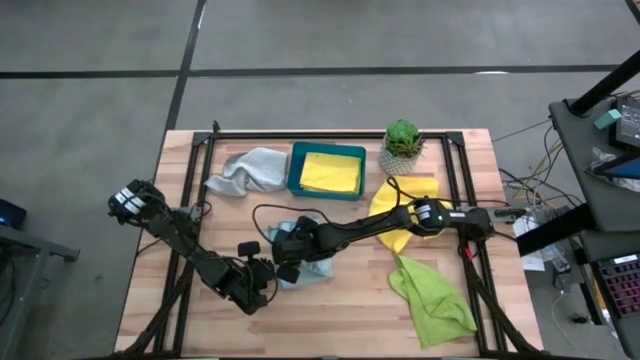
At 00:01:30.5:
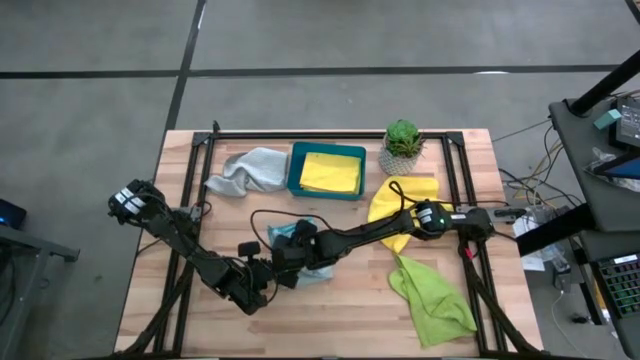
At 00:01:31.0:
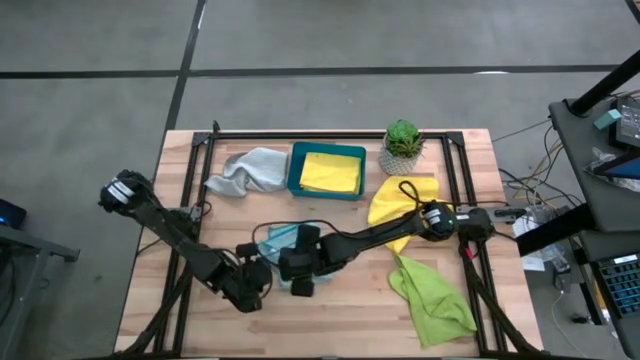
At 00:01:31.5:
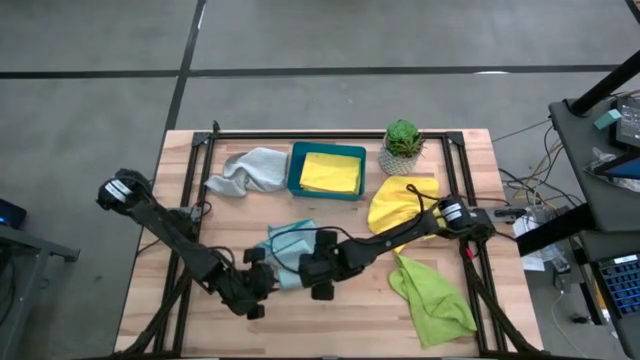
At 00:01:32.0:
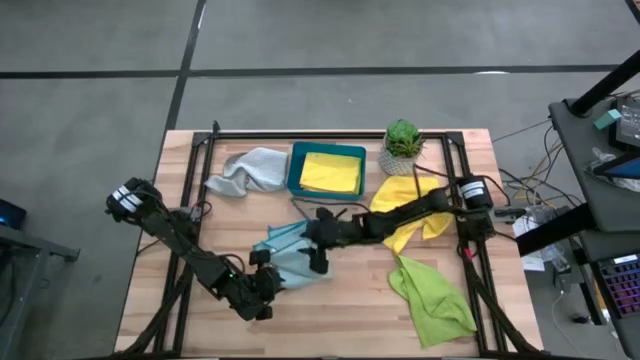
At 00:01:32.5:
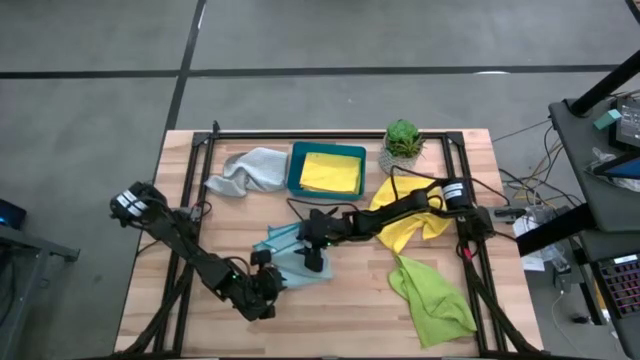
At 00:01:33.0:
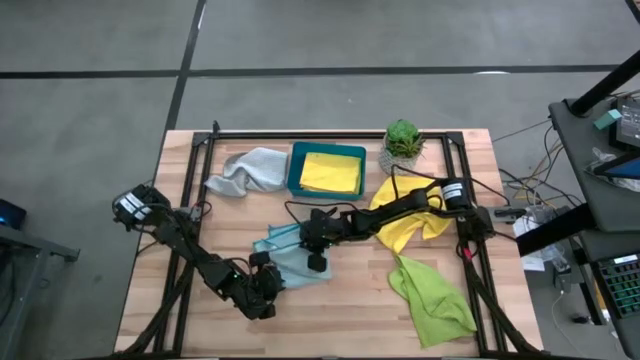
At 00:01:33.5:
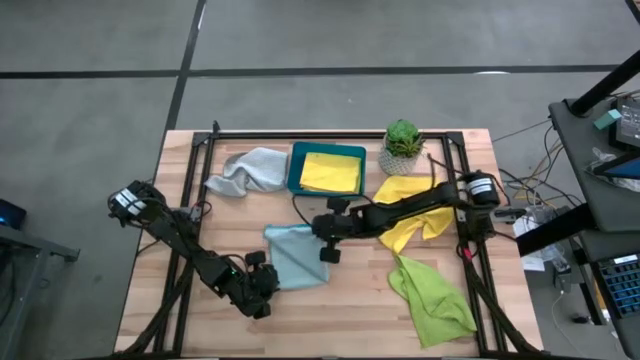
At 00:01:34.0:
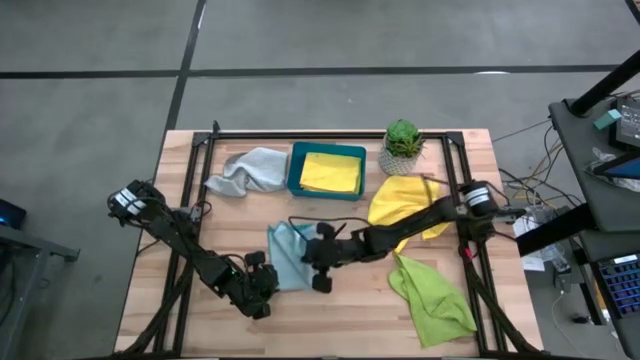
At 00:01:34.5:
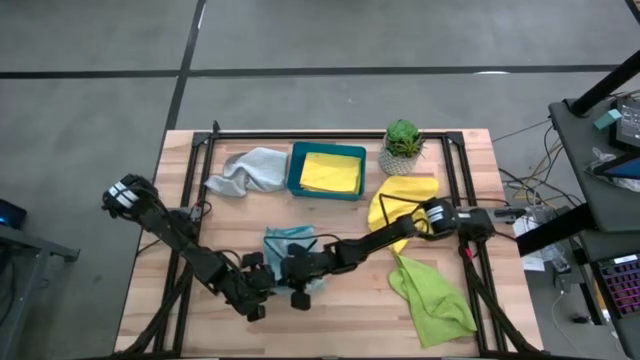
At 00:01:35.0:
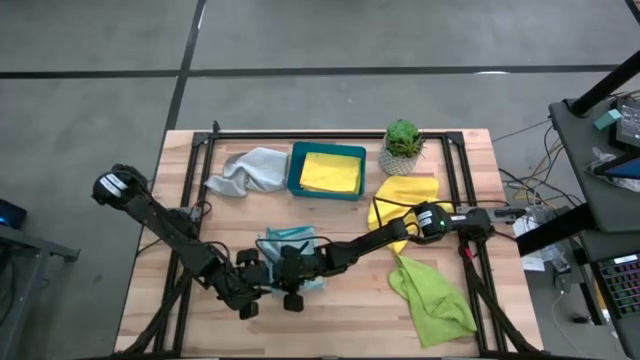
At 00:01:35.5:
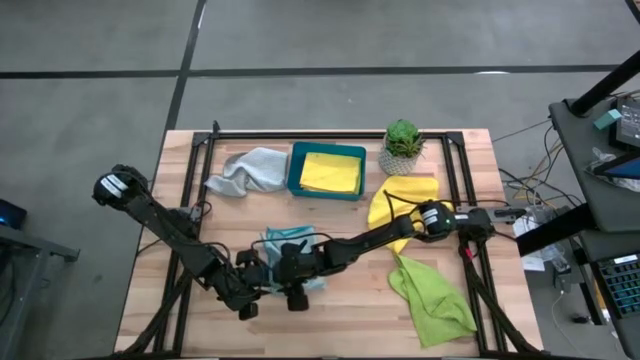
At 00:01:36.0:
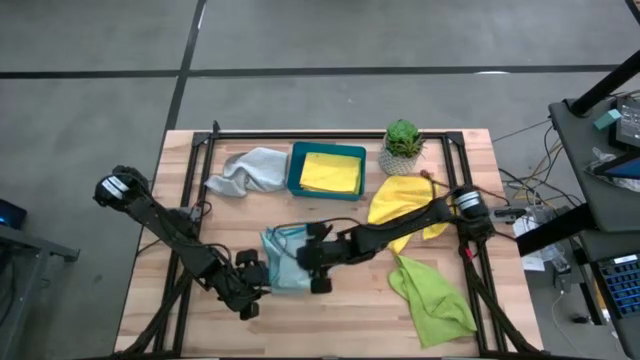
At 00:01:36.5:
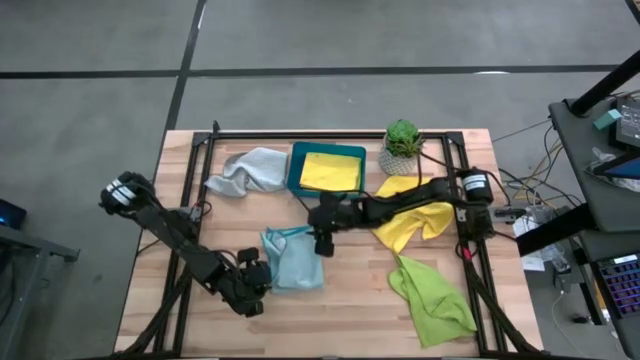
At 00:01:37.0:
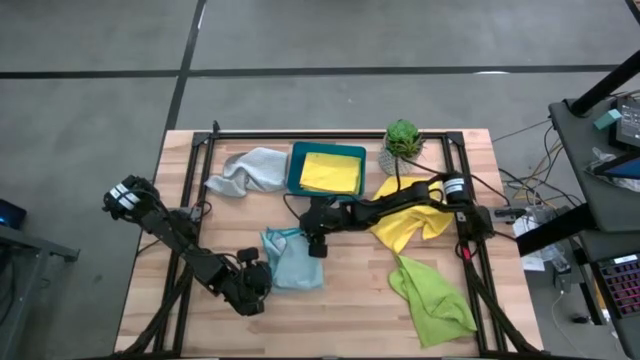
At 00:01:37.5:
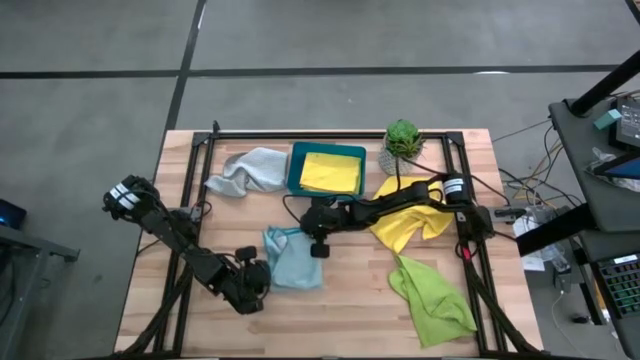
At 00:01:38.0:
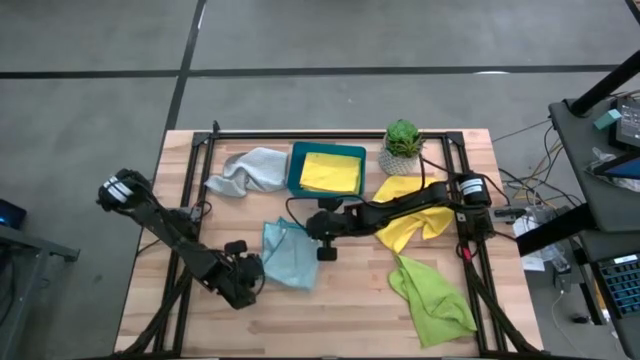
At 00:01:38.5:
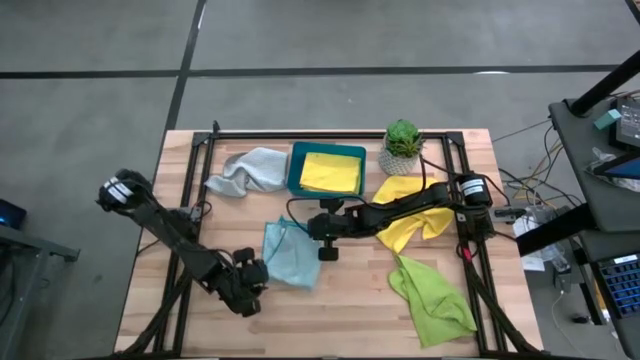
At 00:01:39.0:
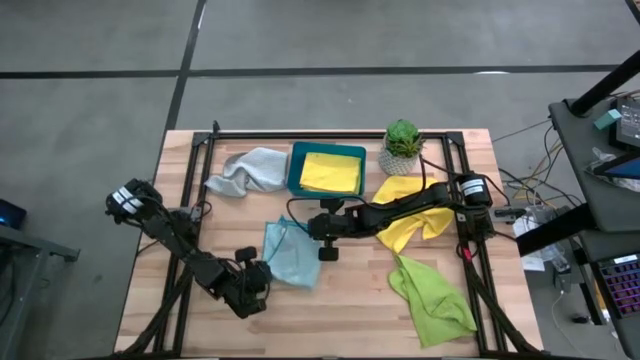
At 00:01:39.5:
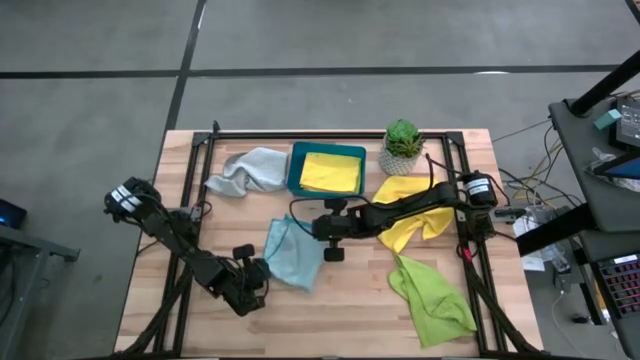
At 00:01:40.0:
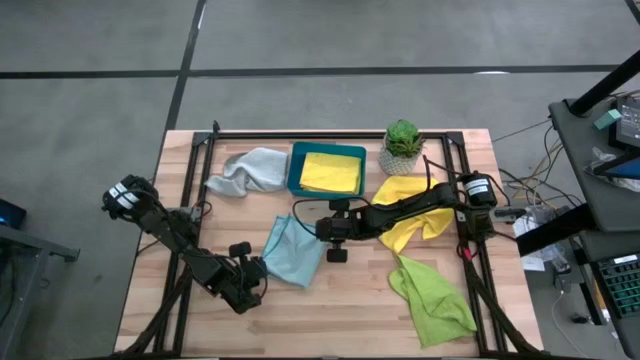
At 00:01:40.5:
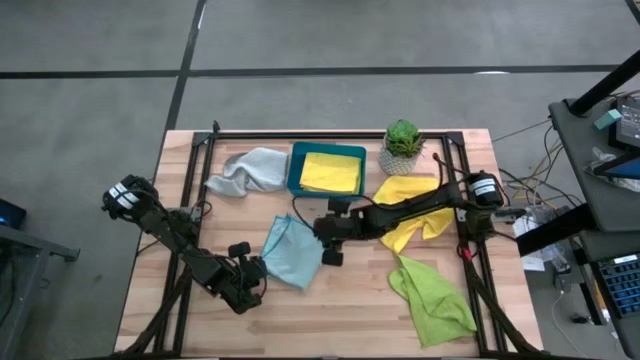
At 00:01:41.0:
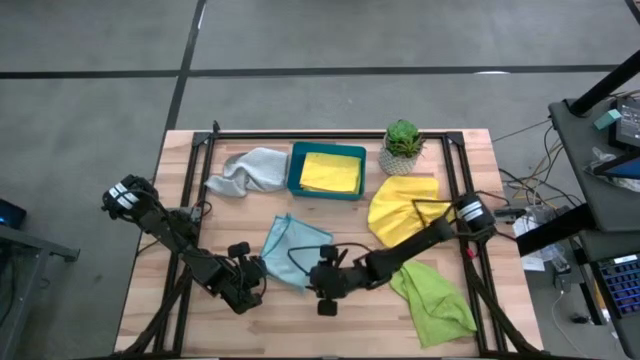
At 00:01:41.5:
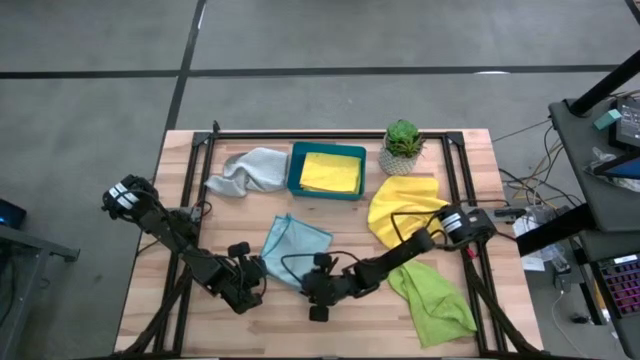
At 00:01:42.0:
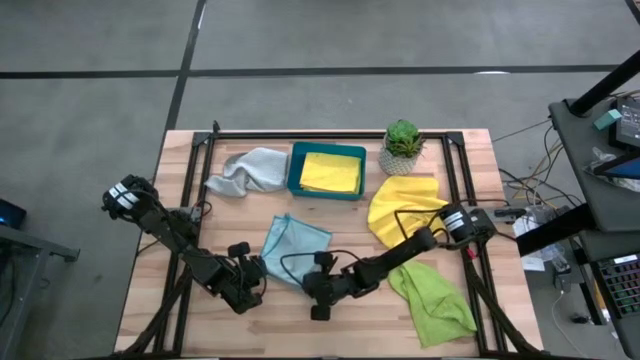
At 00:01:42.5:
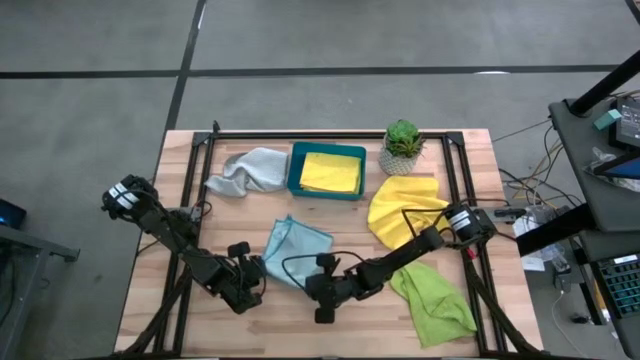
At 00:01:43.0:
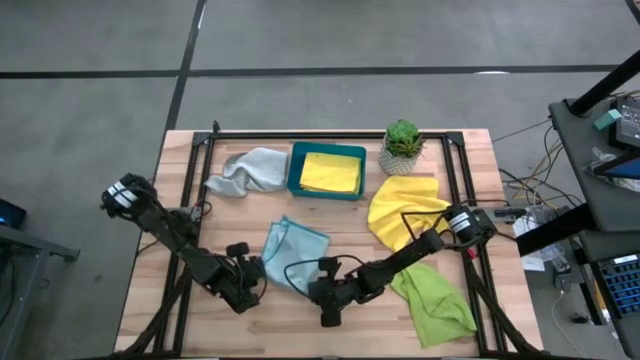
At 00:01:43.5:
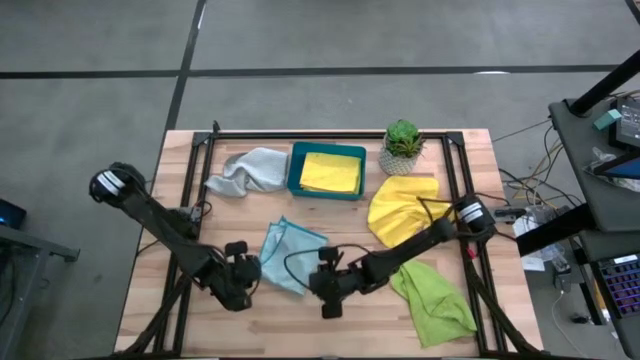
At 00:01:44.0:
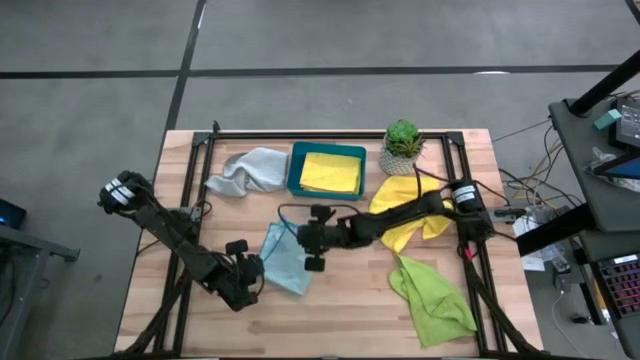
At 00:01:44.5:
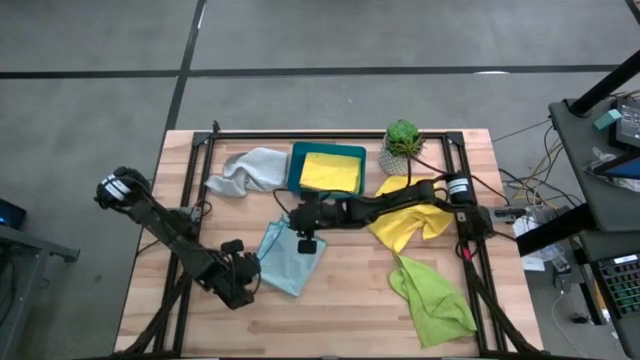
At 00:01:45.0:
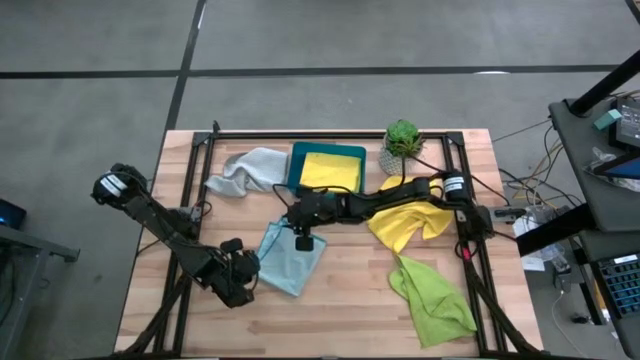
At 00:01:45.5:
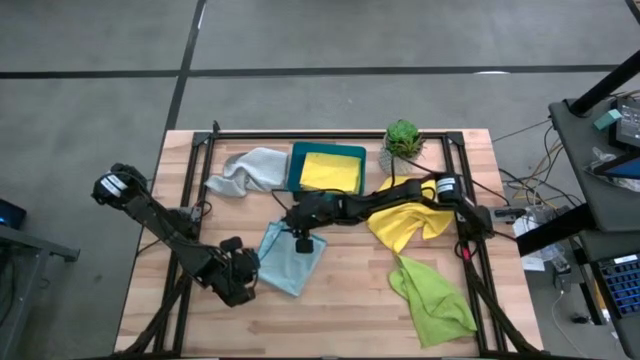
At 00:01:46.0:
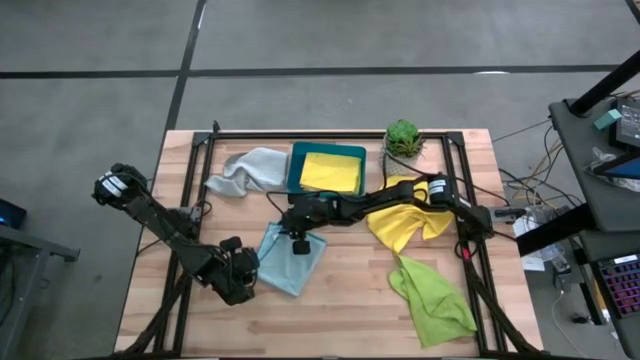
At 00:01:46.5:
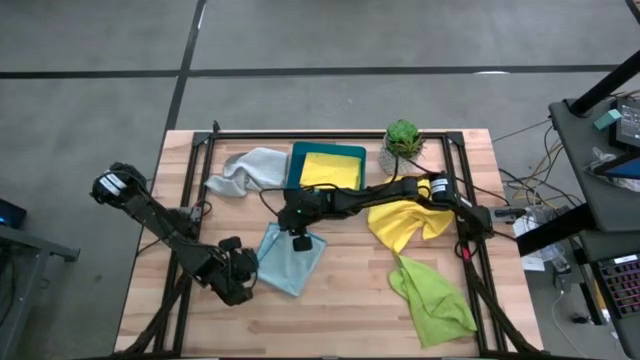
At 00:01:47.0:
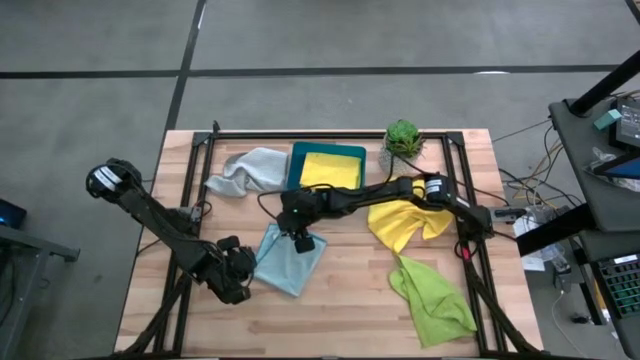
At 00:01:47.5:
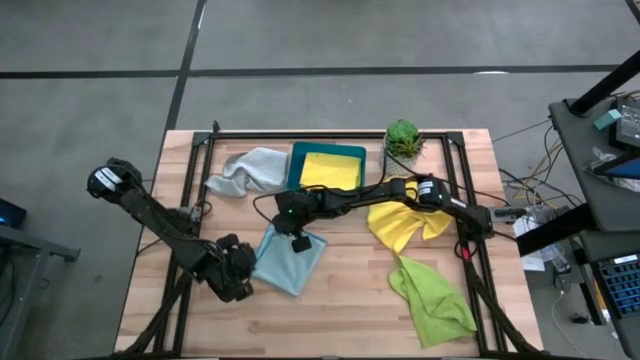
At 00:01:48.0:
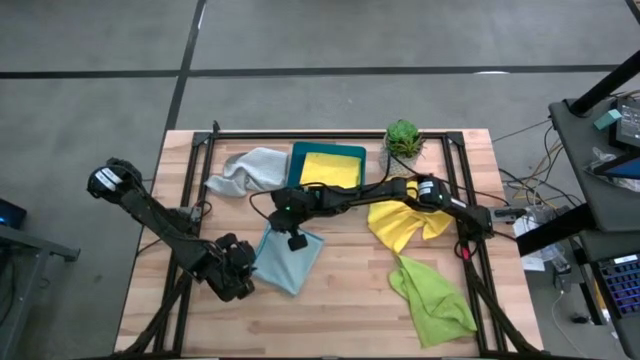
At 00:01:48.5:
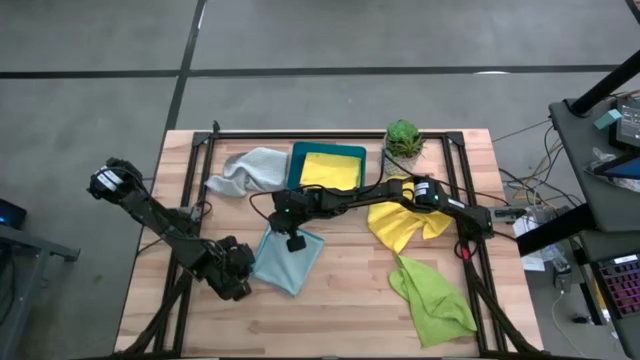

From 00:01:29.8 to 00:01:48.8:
Task: Fold microfiber towels
Fold the light blue microfiber cloth

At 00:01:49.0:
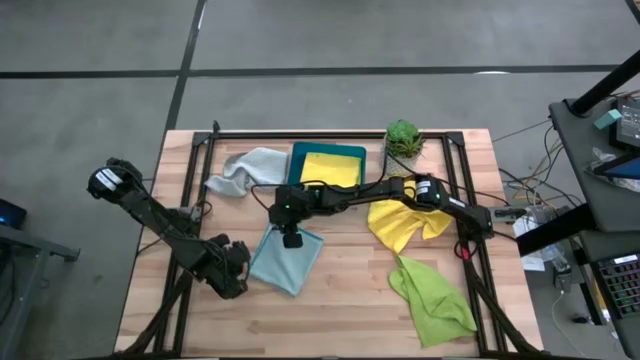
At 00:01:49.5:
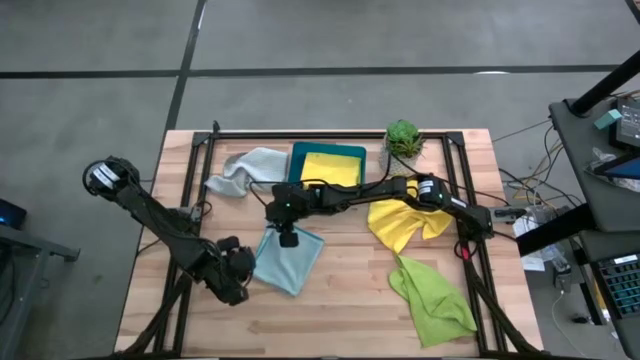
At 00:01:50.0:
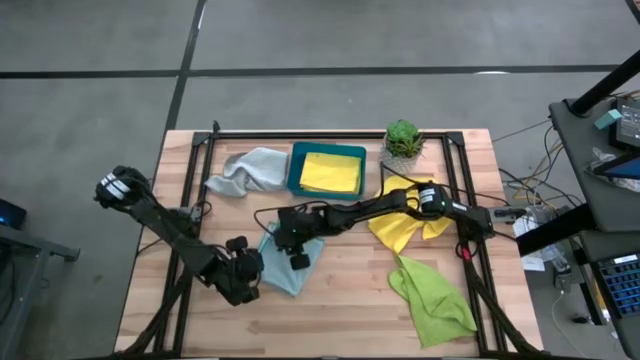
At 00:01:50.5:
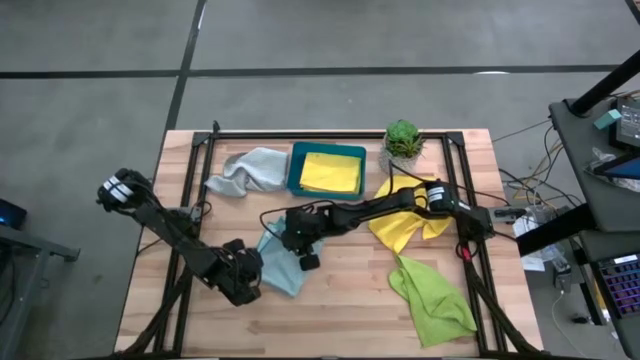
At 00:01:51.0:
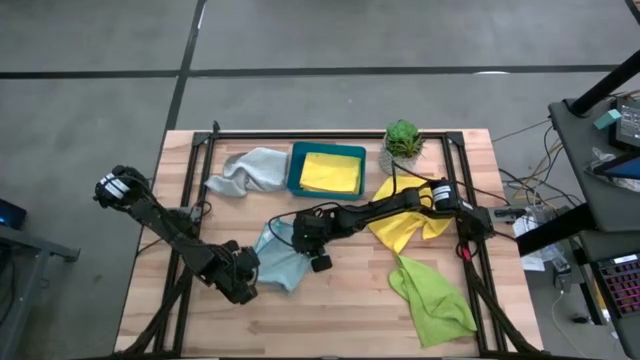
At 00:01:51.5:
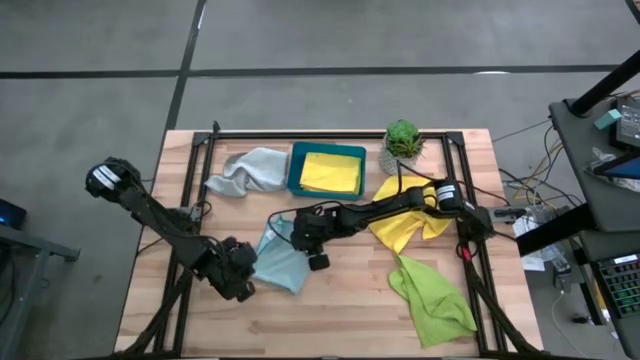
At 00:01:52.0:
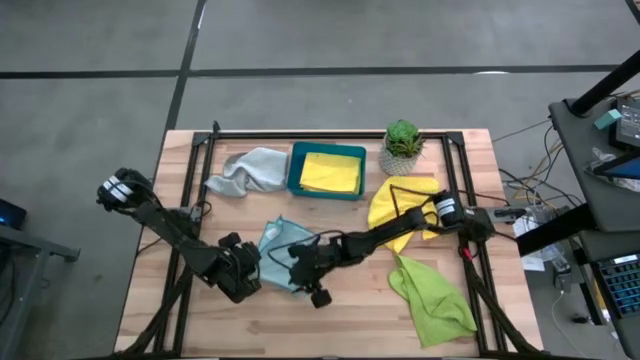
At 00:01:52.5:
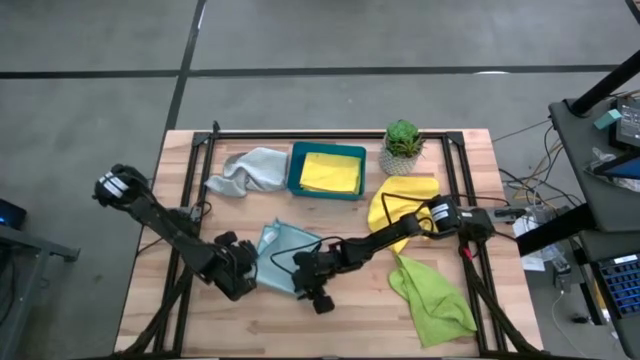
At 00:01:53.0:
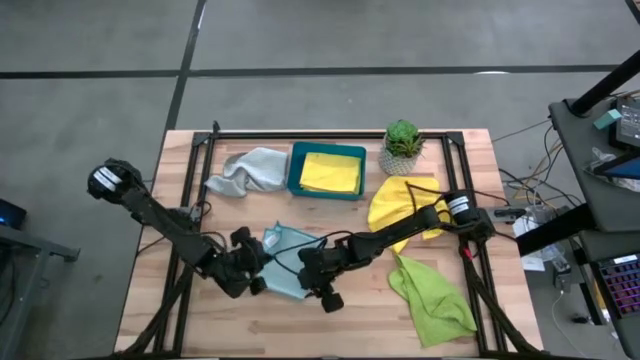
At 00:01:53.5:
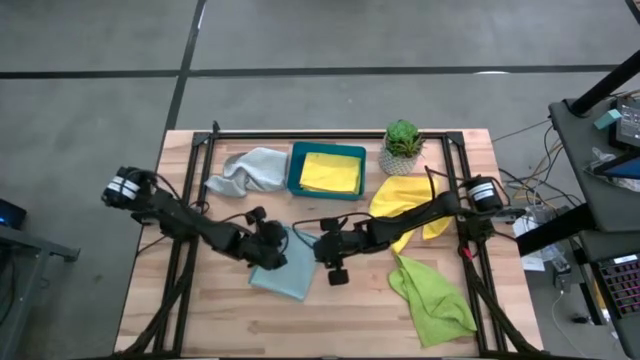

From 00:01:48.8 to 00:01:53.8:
Fold the light blue microfiber cloth
